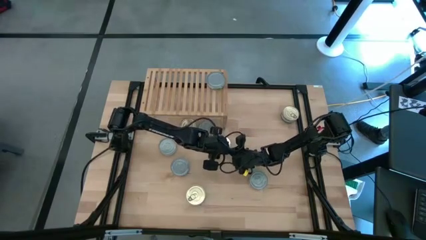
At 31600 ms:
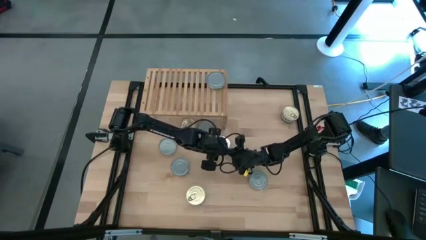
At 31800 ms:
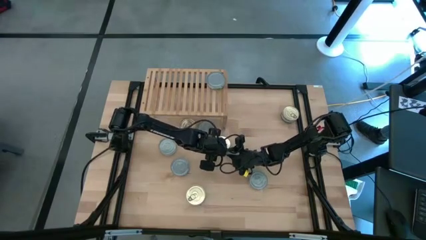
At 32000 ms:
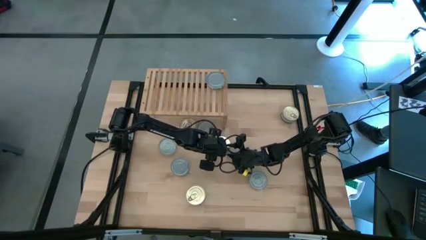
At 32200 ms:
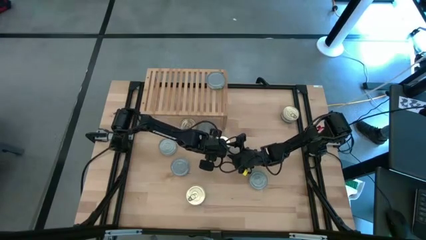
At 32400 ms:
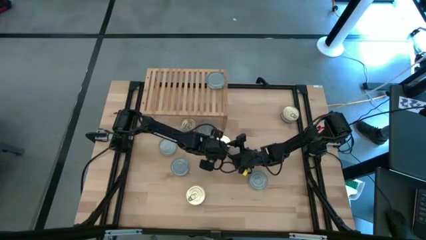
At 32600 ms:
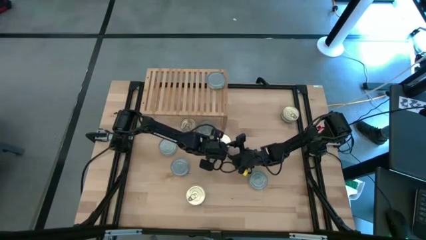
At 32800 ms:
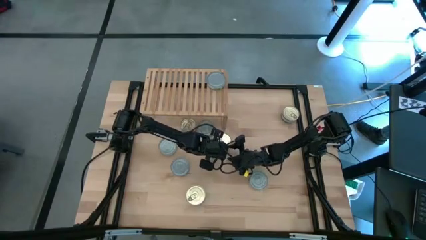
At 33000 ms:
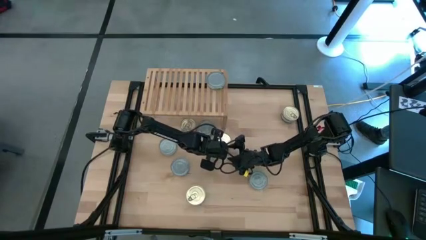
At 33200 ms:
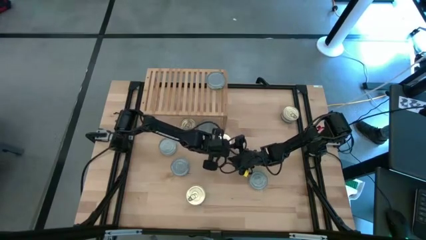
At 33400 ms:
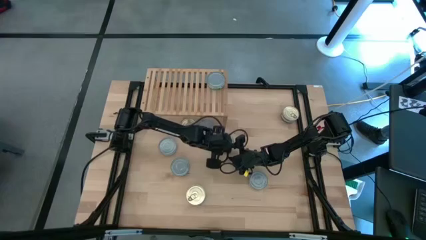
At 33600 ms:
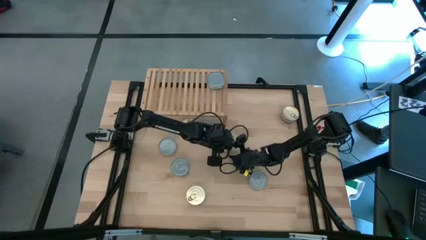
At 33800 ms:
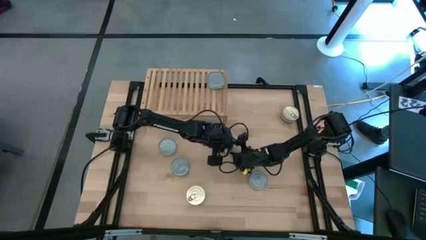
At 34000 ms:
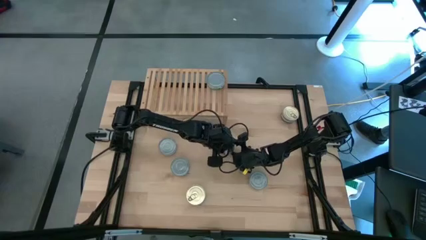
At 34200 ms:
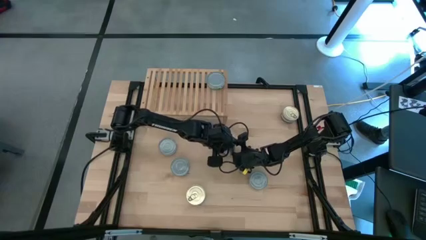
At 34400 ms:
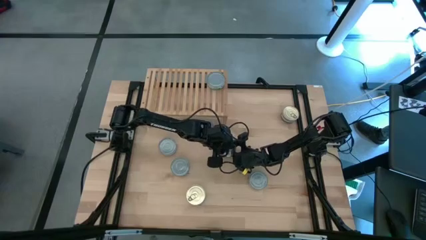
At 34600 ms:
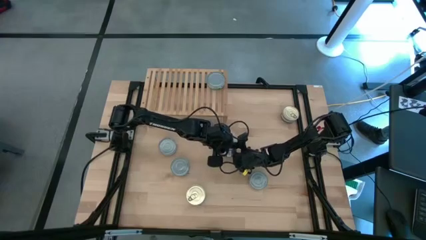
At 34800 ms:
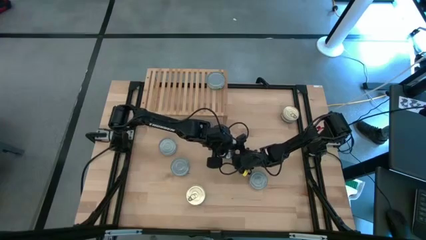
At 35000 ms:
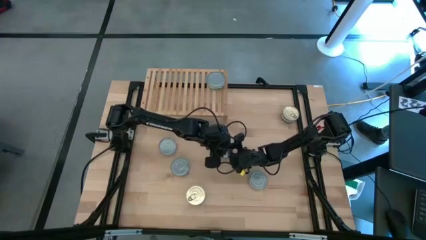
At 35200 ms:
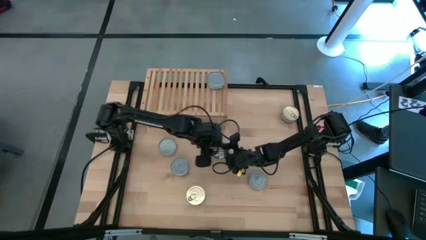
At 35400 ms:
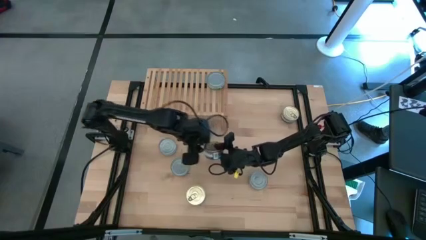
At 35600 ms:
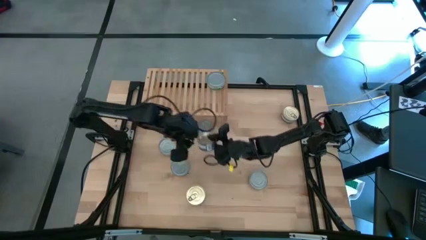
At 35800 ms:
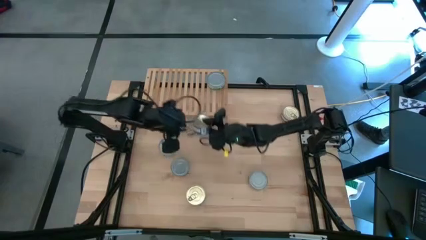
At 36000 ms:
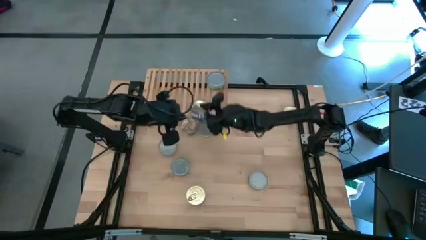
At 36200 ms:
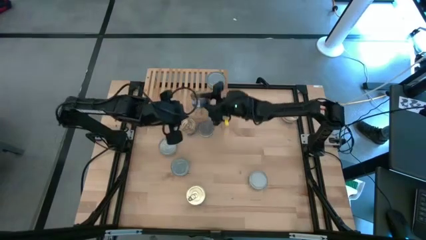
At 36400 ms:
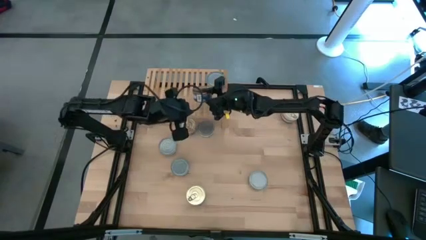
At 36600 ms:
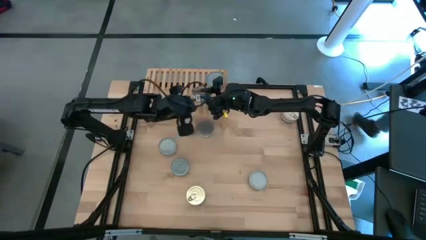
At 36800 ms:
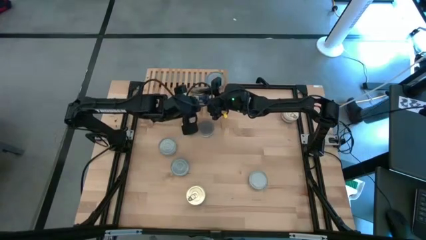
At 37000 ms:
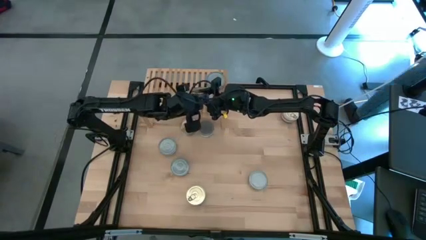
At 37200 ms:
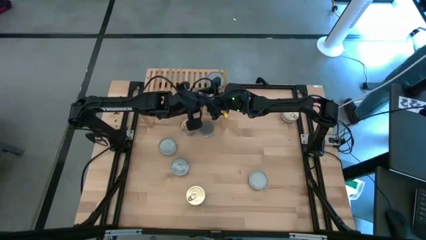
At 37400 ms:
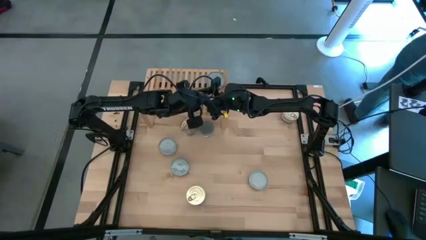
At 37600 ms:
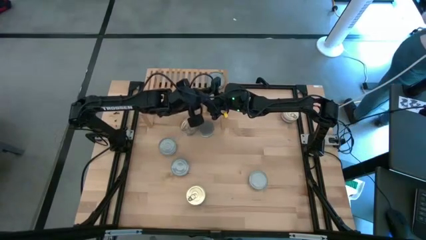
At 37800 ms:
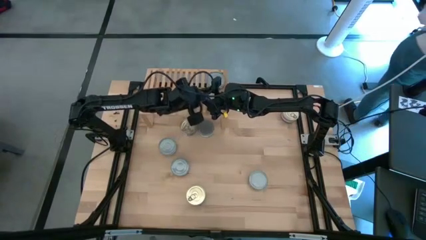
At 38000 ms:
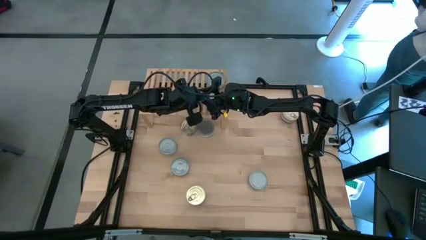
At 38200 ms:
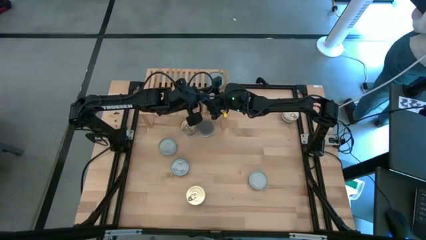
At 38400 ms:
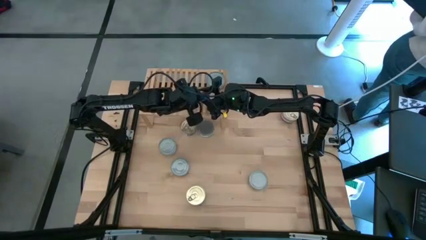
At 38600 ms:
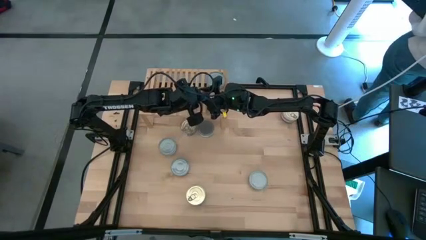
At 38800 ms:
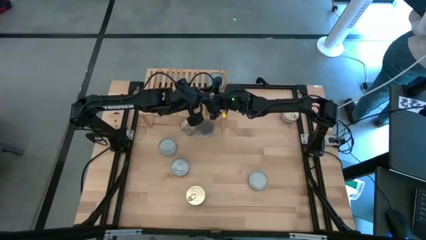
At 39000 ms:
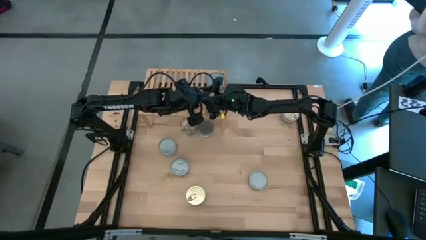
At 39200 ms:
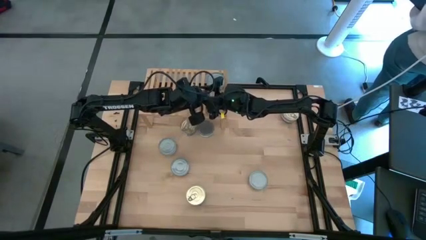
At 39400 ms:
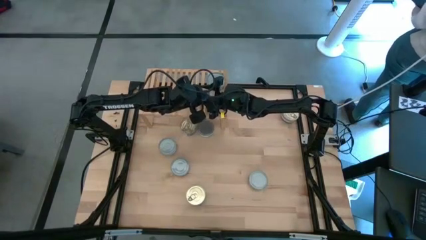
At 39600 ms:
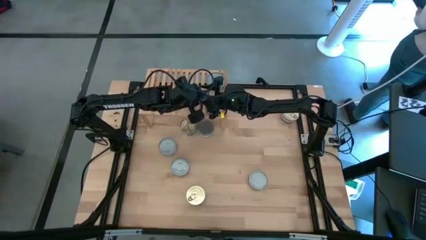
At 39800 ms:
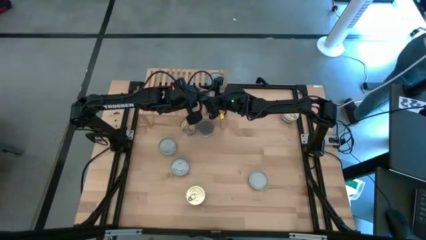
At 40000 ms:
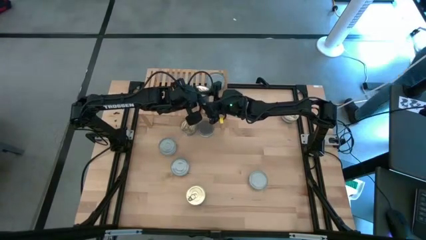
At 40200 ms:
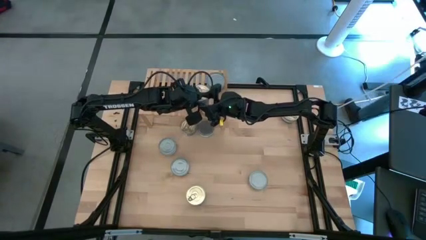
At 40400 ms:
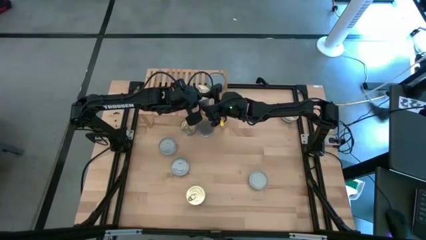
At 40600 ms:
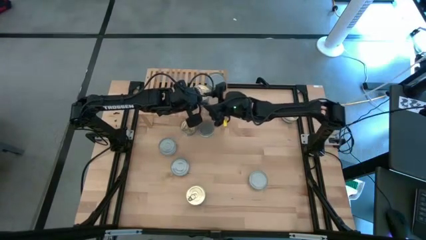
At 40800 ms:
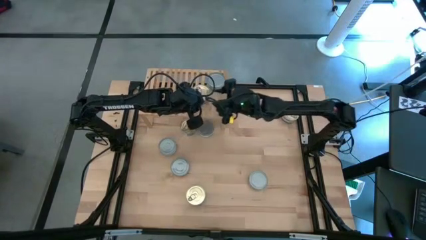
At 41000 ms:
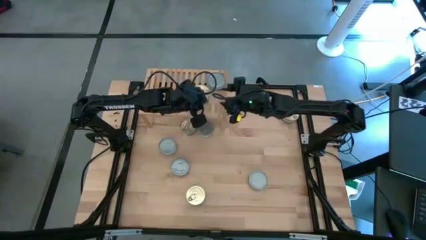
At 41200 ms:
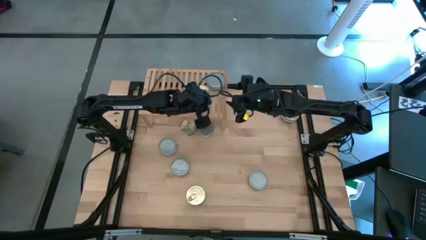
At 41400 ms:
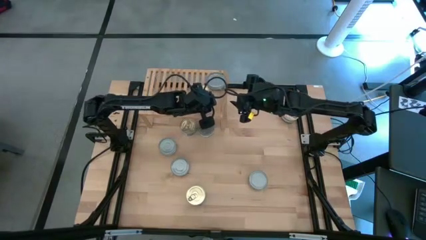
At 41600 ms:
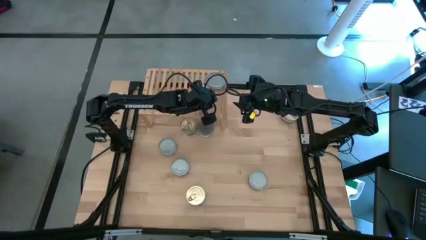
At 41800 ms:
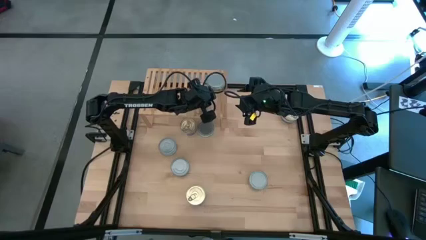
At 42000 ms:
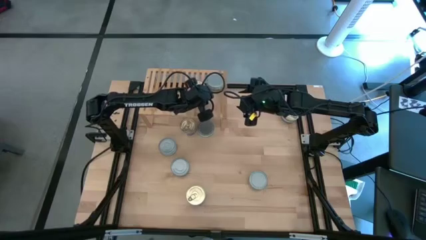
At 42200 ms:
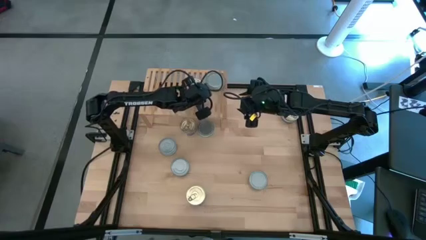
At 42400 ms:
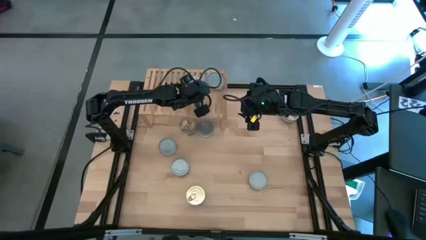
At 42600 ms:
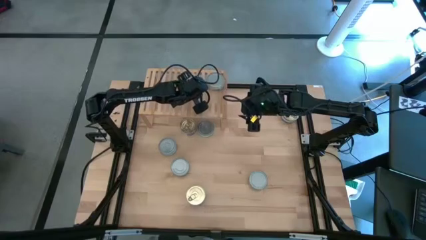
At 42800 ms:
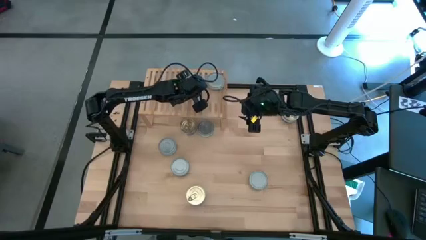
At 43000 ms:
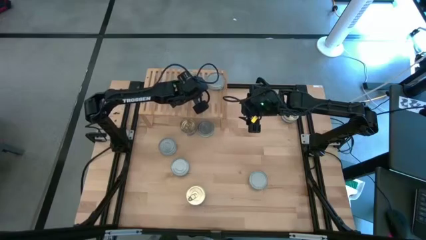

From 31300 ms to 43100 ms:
Task: Stack canned seafood by type on shelf
Put the blue tuna can on the shelf

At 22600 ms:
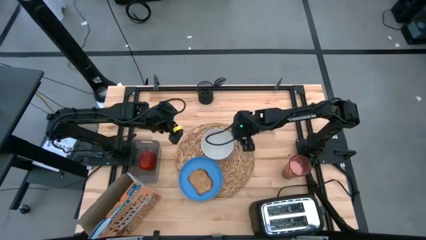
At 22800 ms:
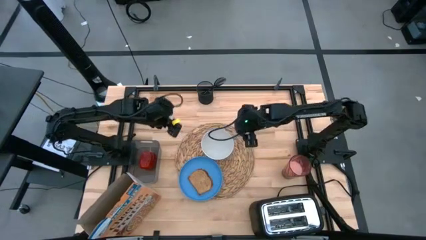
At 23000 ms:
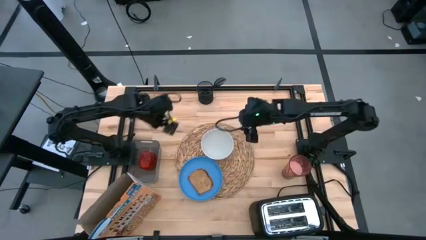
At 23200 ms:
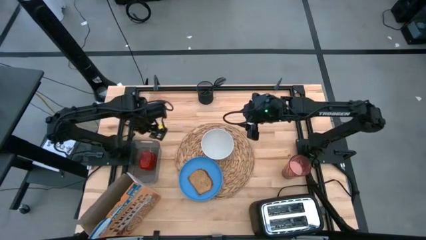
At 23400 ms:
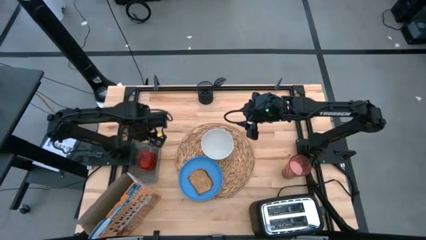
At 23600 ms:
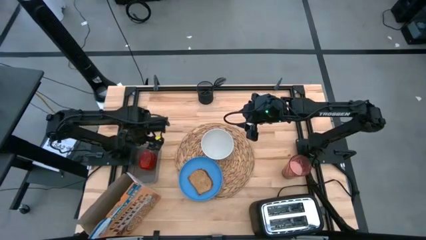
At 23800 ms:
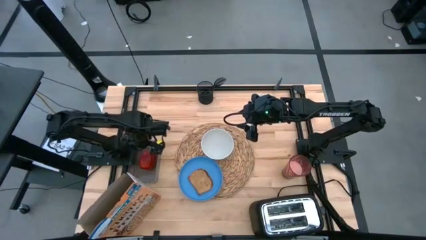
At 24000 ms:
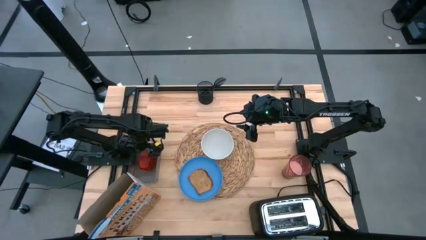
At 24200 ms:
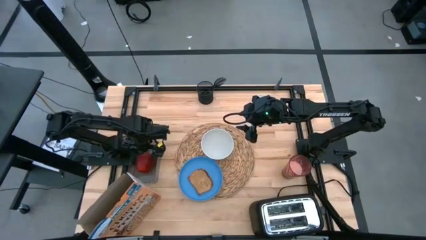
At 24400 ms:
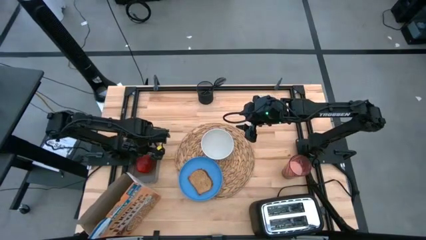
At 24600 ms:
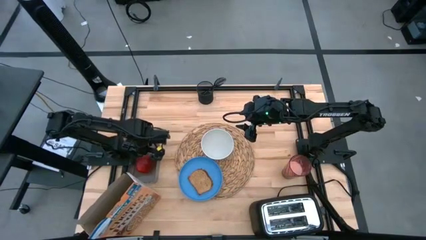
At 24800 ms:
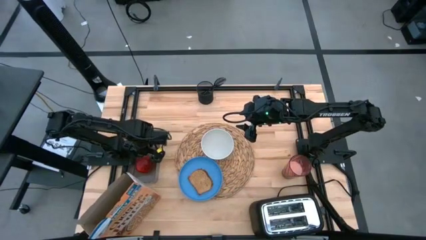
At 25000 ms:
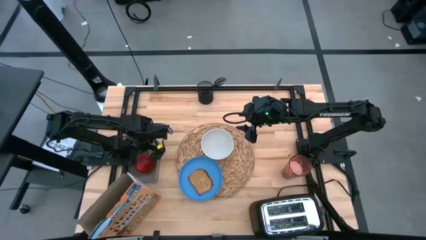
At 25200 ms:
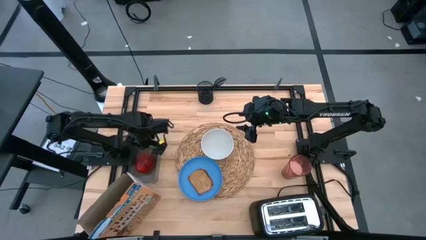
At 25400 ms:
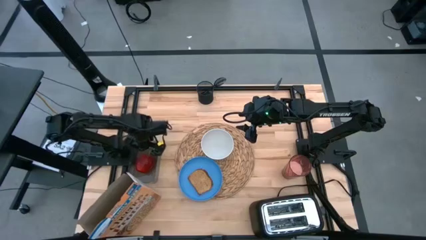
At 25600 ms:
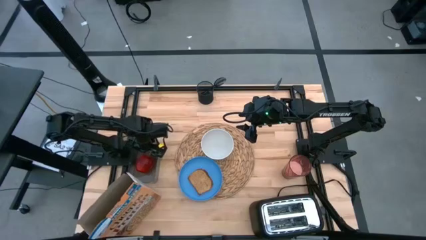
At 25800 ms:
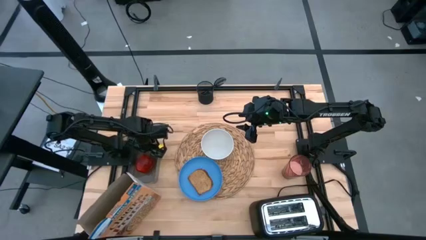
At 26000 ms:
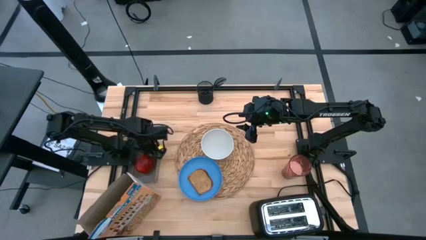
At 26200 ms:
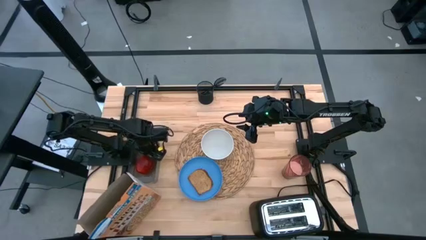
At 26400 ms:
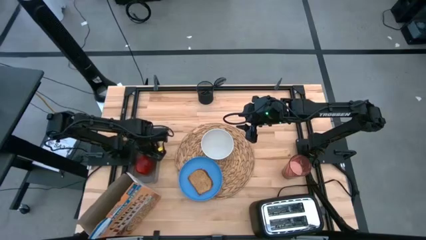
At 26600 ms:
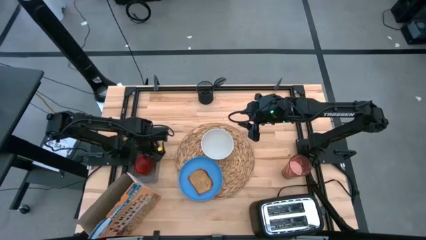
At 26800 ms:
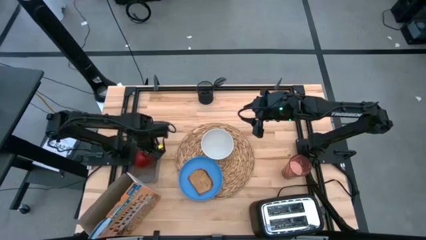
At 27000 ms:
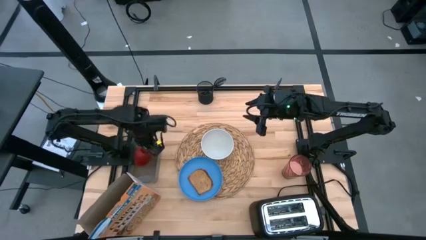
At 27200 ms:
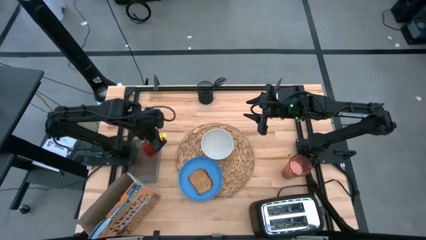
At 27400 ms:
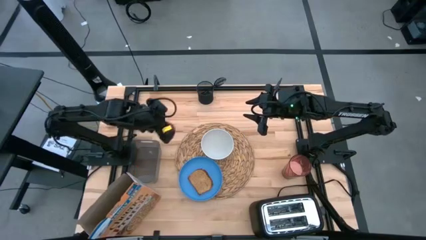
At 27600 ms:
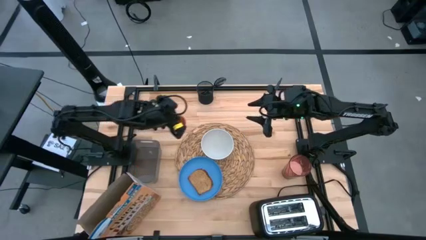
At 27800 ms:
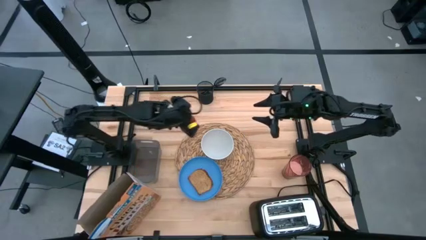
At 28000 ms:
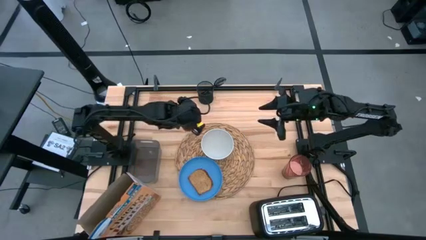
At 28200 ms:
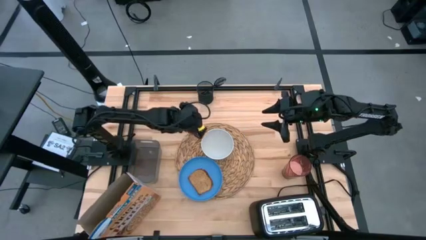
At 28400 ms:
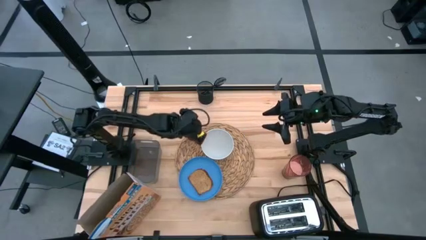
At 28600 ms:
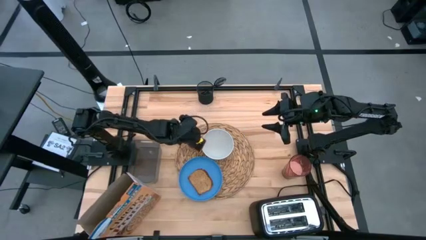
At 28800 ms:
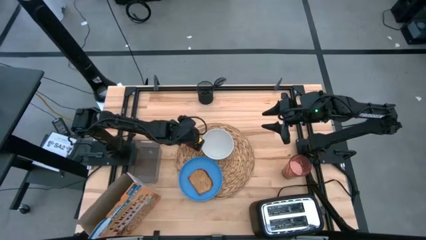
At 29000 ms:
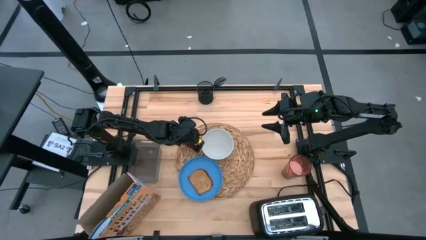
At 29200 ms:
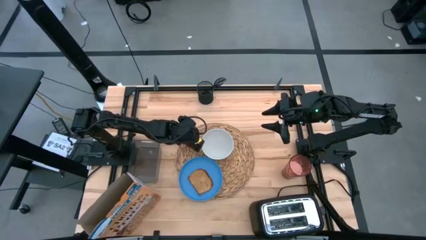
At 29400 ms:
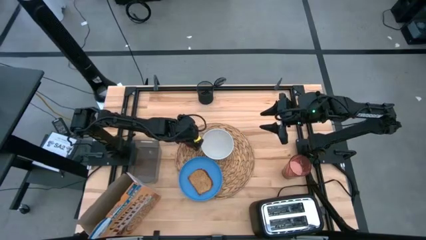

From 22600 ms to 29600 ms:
Task: Arrange a breakfast setting
Put the apple on the brown placemat to the left of the white bowl
